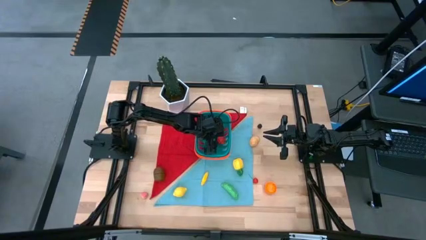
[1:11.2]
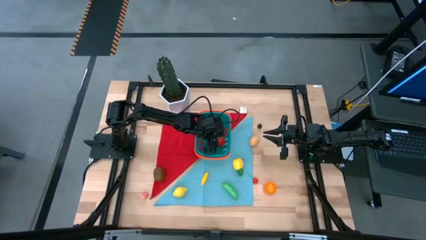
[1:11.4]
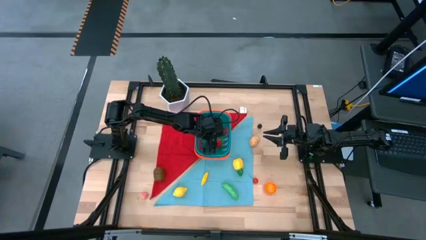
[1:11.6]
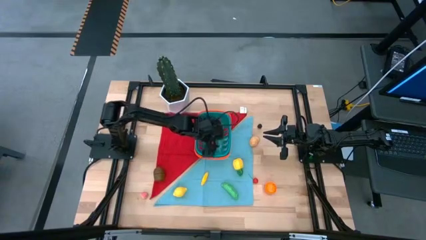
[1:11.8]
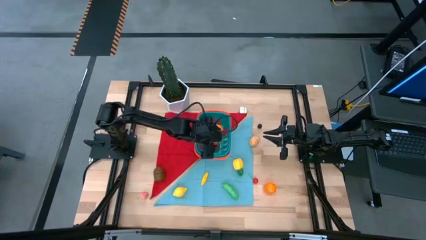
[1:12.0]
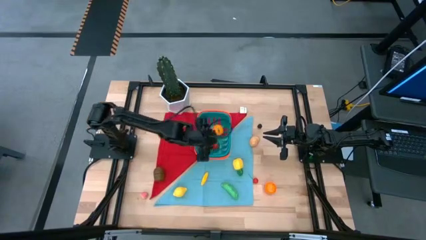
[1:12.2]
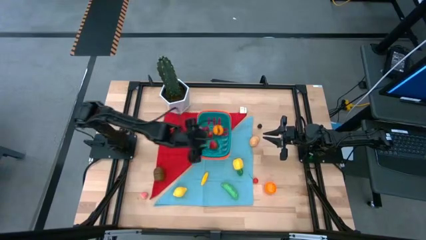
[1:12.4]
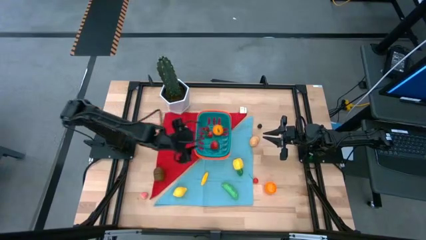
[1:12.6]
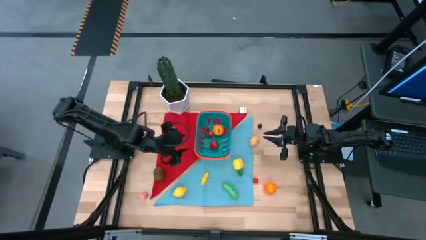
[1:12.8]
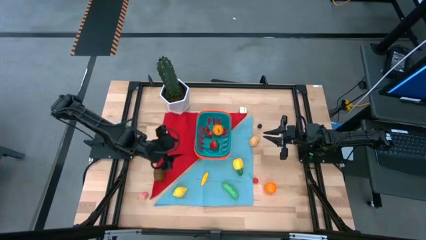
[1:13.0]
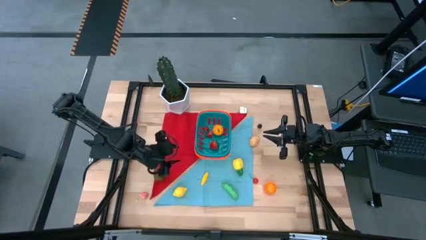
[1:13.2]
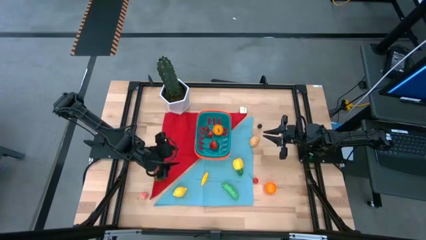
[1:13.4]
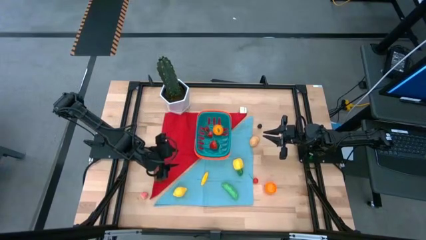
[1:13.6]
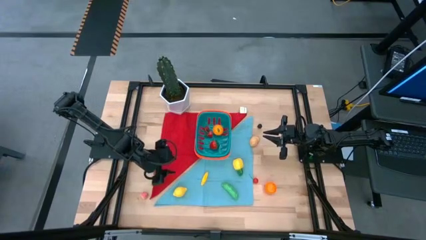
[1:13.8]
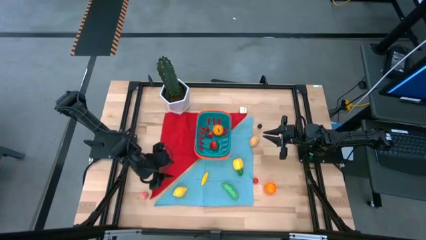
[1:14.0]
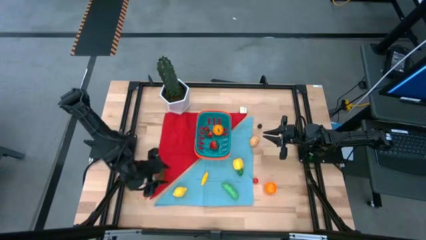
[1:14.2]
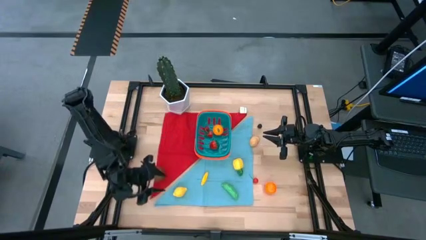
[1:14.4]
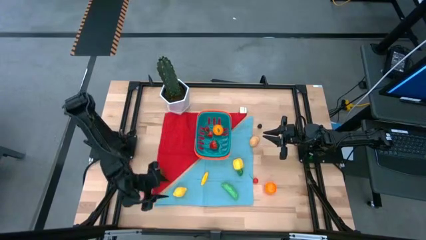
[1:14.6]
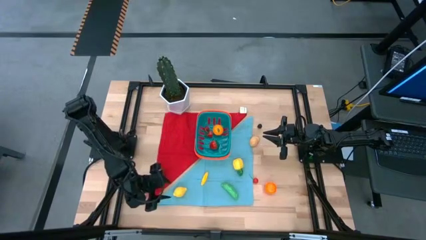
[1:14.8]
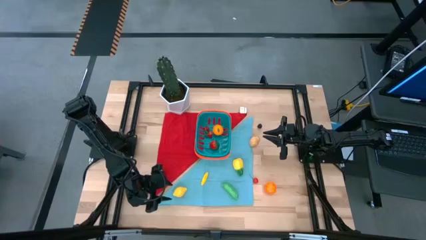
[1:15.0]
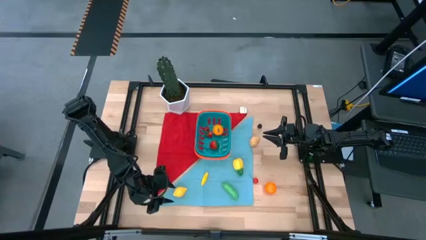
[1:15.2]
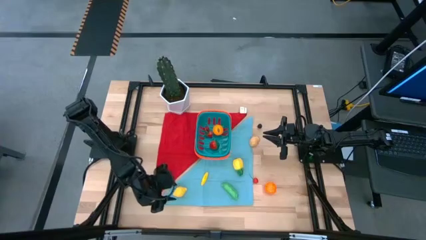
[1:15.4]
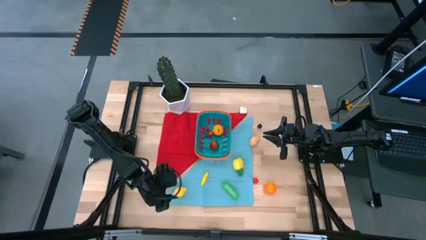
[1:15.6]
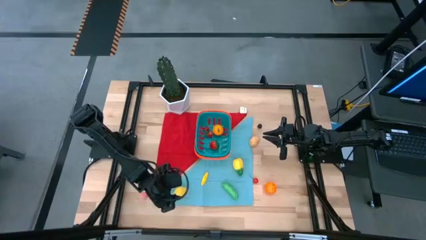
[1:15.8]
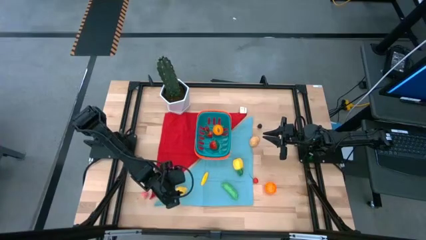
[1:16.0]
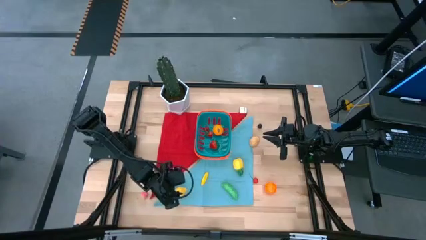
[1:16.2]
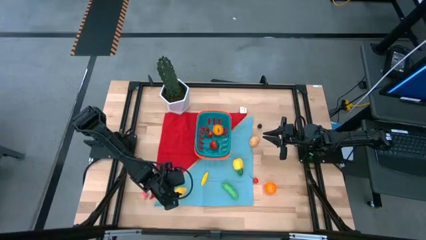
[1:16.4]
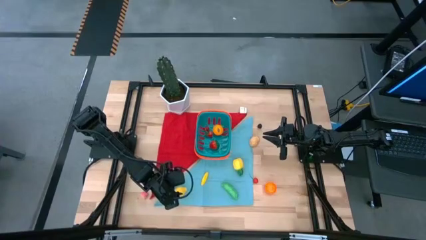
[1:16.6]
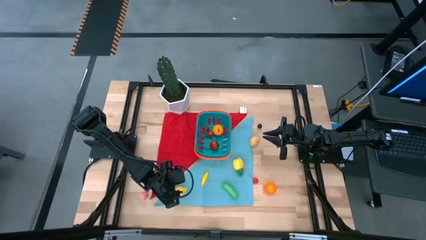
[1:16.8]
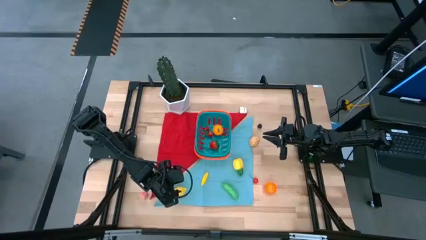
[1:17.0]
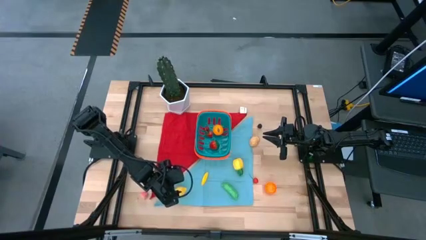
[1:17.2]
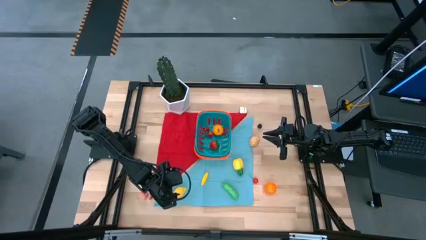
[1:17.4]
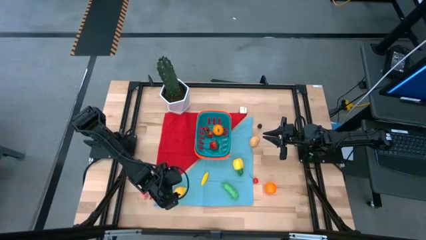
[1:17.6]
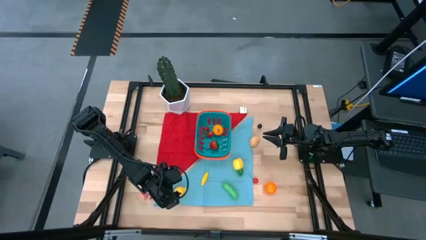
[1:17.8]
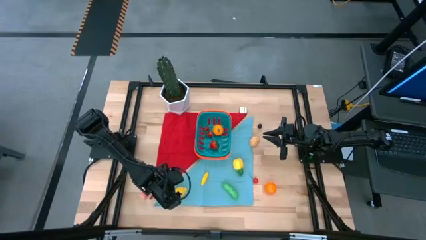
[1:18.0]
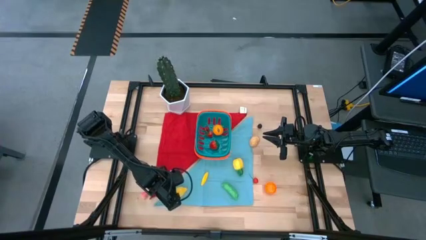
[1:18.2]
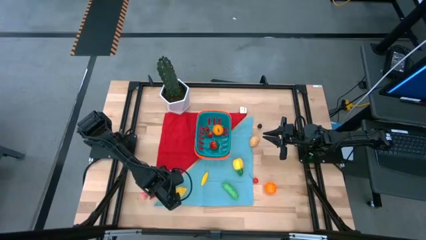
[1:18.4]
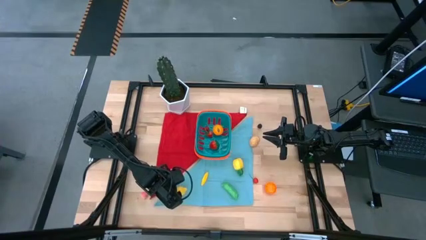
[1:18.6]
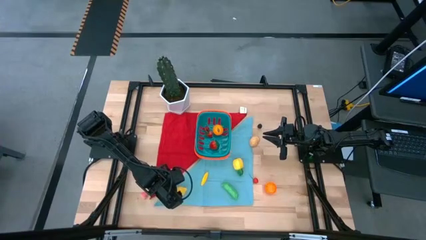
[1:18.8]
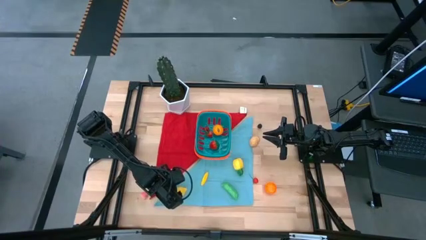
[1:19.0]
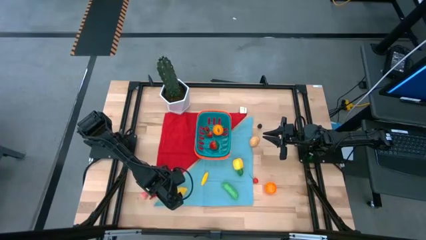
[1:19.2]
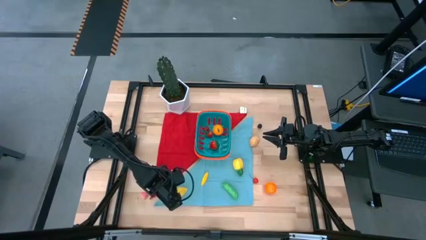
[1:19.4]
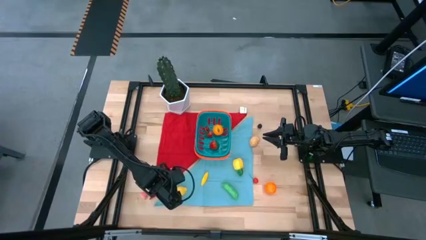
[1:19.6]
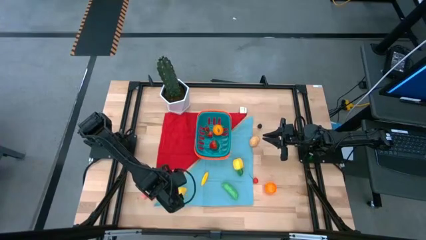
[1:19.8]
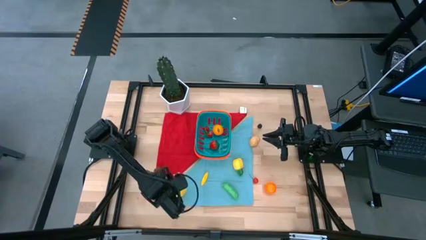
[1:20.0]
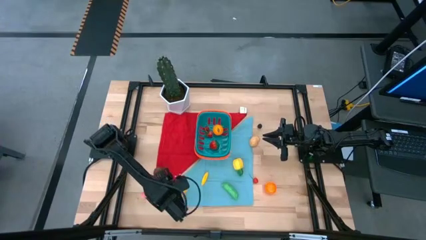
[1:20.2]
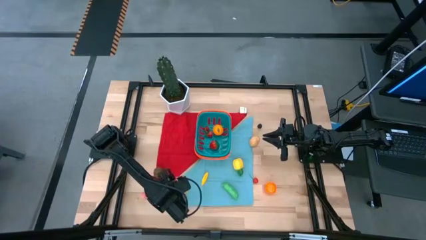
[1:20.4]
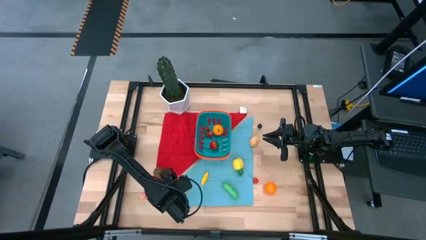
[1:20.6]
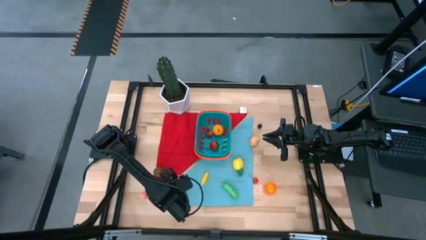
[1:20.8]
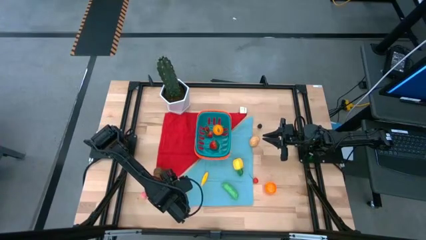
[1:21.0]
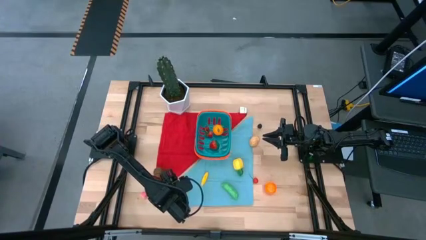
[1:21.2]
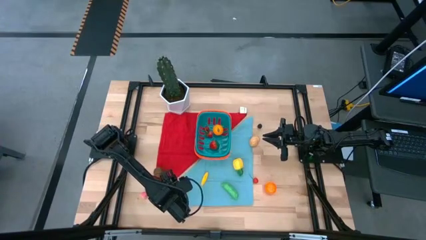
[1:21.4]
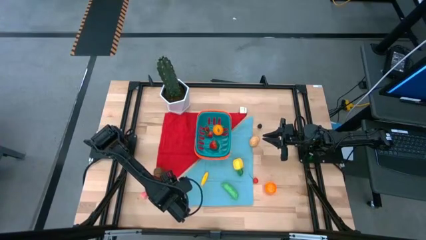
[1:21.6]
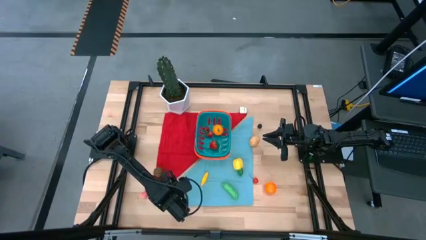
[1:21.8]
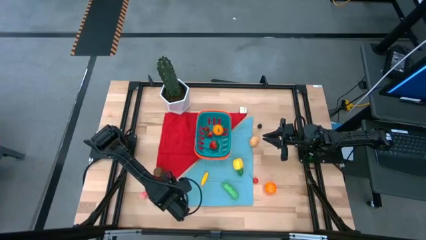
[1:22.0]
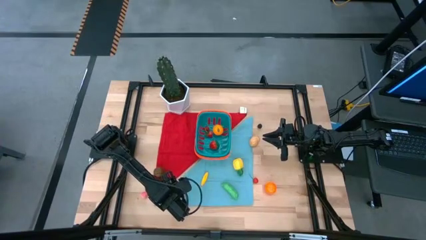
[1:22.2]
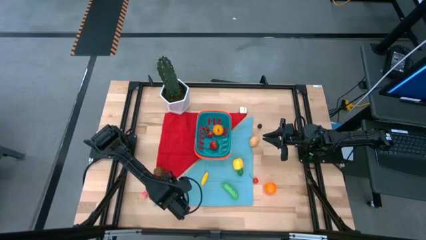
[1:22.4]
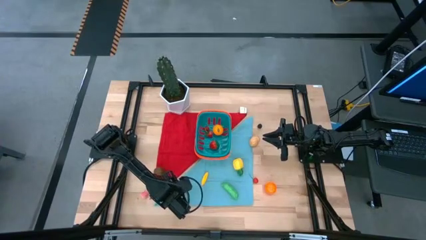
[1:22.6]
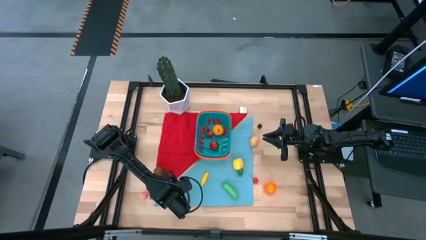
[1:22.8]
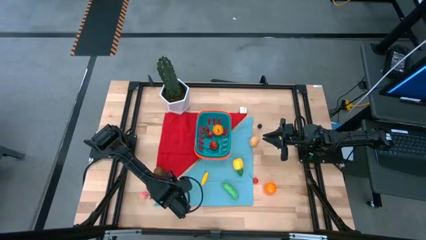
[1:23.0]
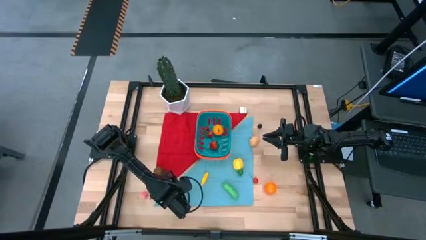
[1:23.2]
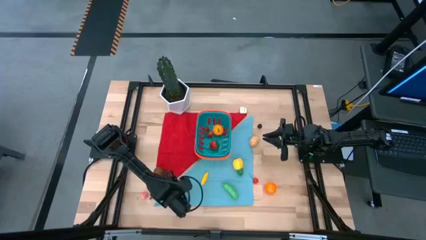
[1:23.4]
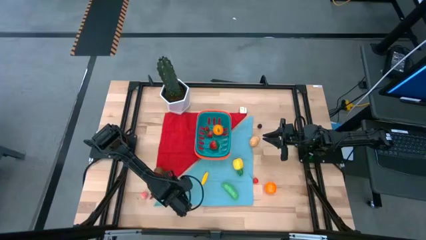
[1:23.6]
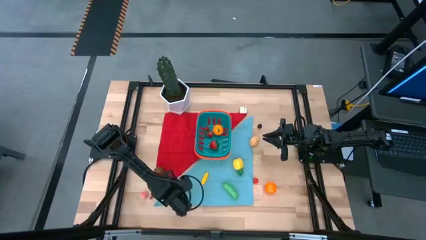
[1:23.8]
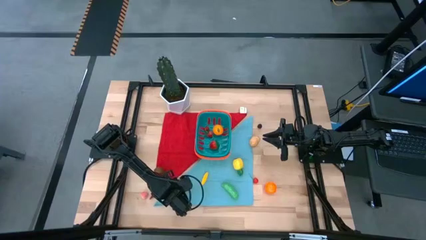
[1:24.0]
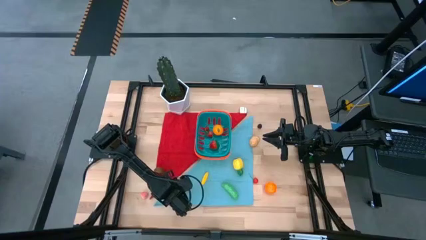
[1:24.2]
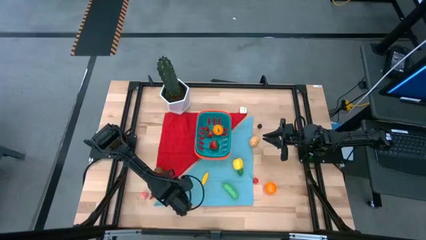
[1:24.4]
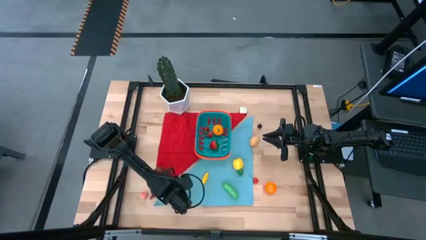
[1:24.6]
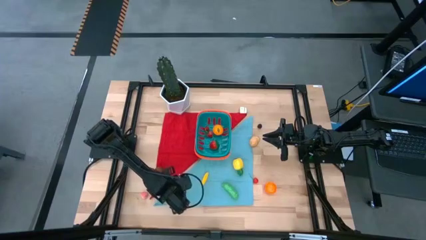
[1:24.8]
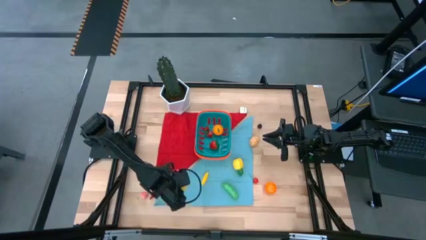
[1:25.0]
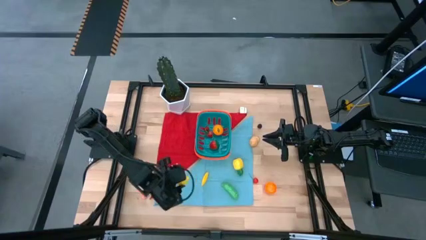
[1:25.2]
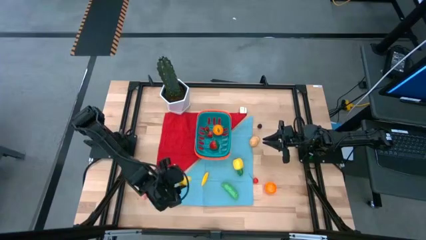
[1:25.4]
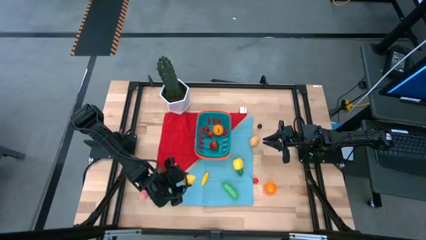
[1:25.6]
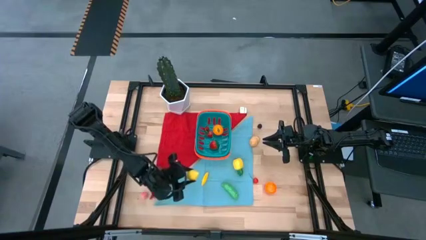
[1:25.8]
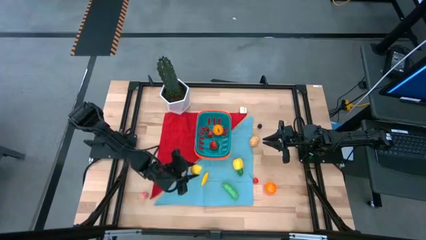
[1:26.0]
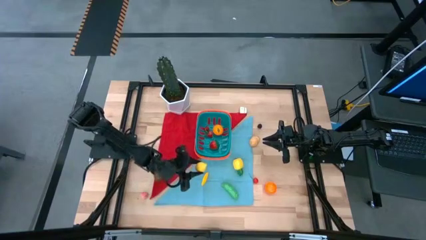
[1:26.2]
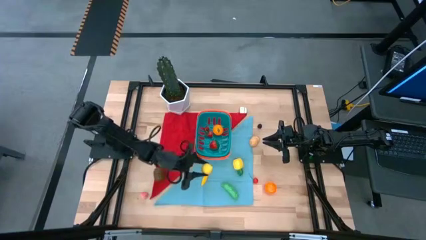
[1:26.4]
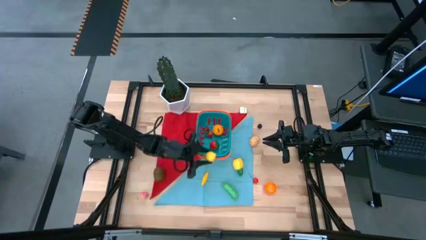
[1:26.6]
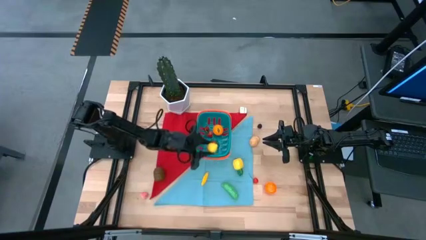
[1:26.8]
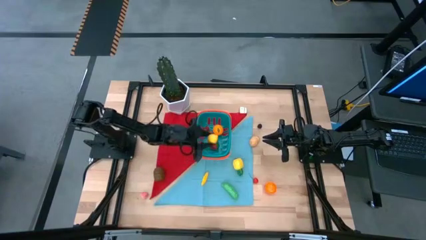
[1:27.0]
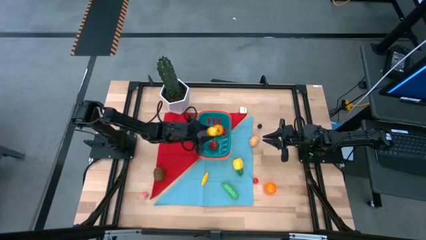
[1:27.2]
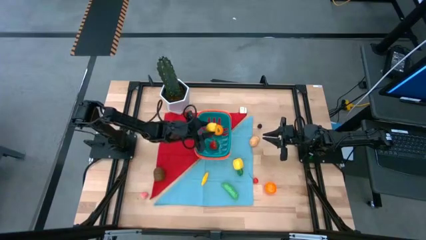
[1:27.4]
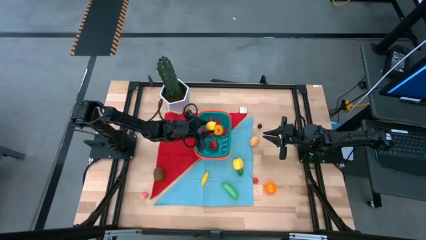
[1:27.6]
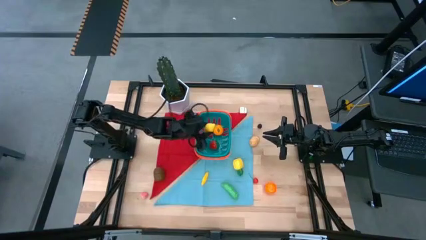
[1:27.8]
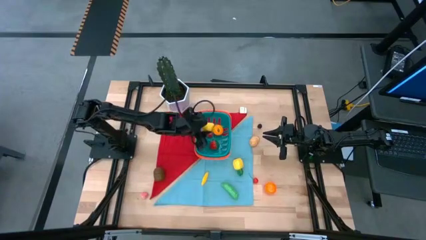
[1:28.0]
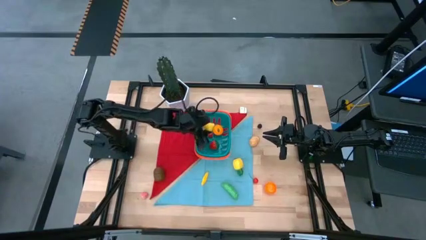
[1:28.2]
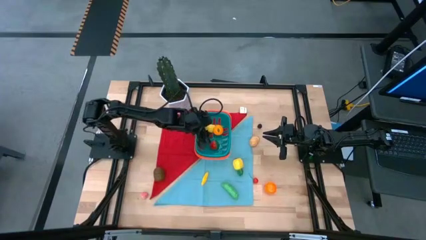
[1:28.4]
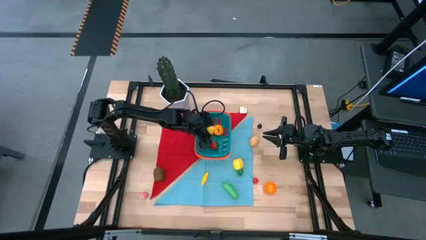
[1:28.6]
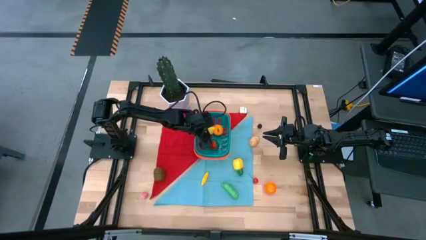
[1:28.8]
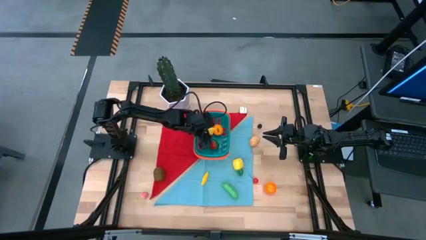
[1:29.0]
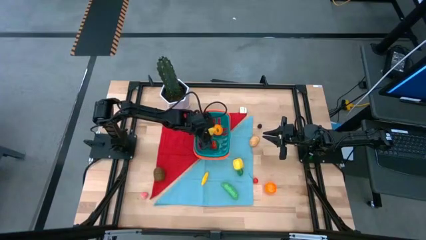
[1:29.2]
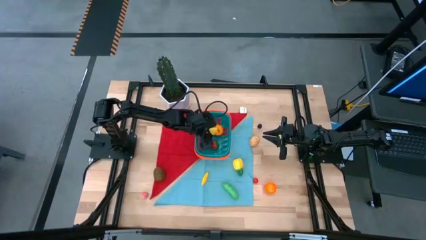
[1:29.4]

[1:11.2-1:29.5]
Task: Pick and placing Produce into tupperware
Put the lemon into the basket
